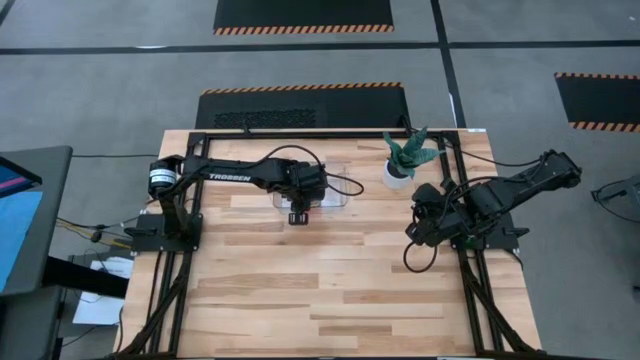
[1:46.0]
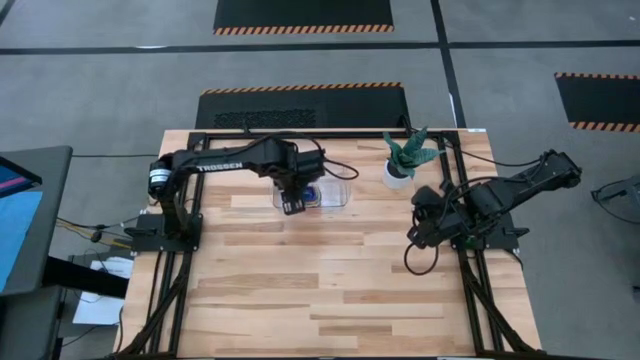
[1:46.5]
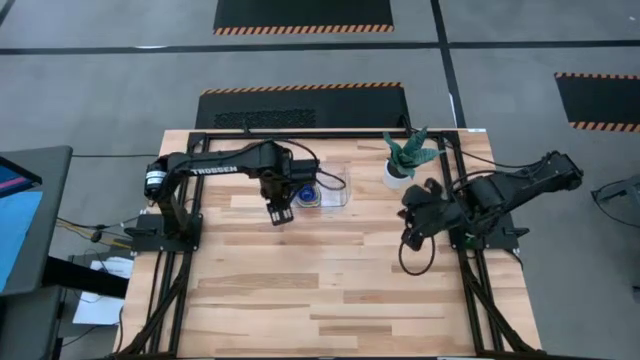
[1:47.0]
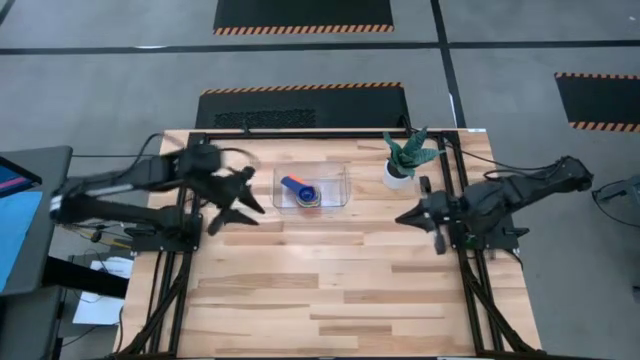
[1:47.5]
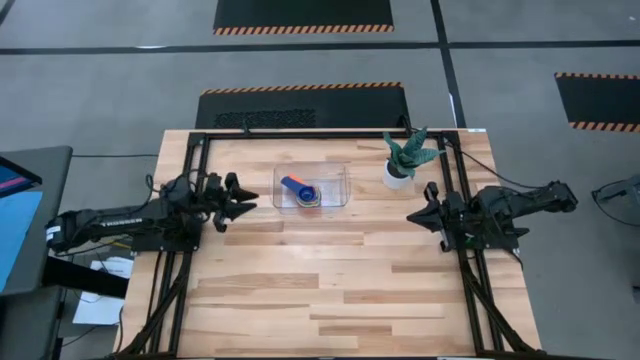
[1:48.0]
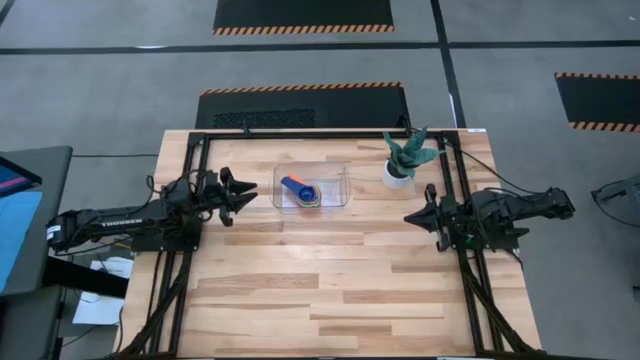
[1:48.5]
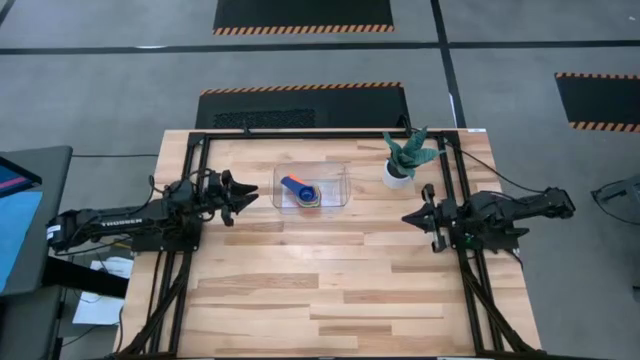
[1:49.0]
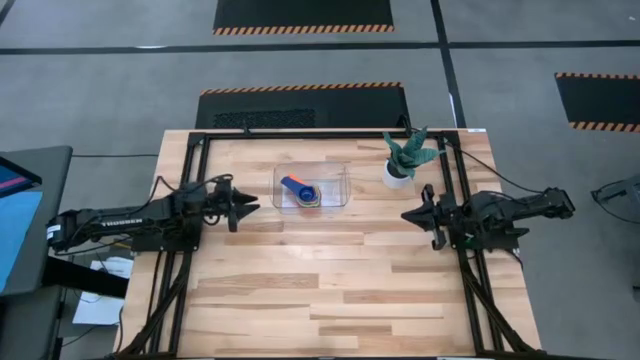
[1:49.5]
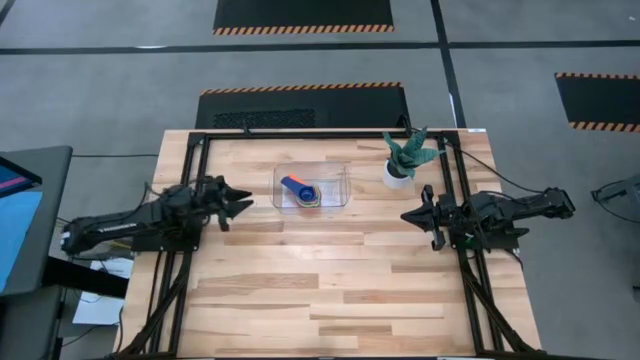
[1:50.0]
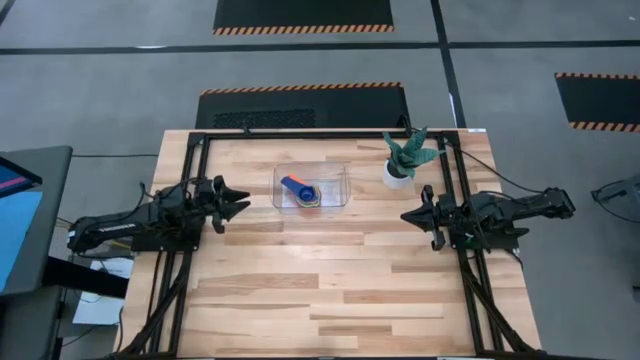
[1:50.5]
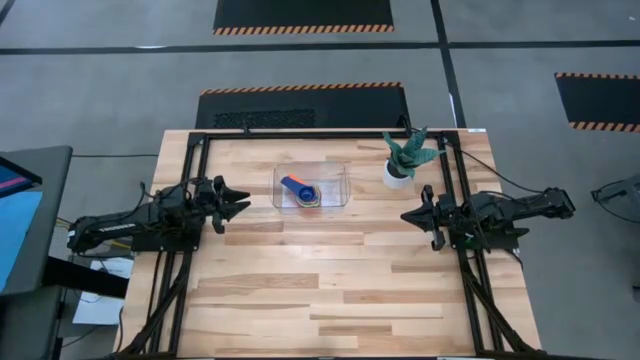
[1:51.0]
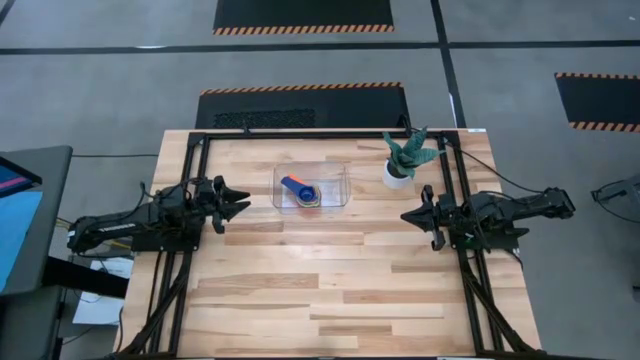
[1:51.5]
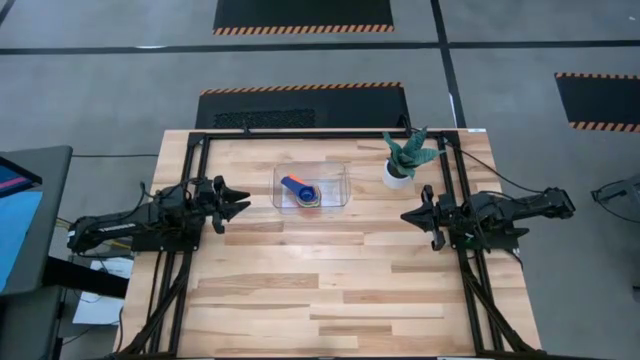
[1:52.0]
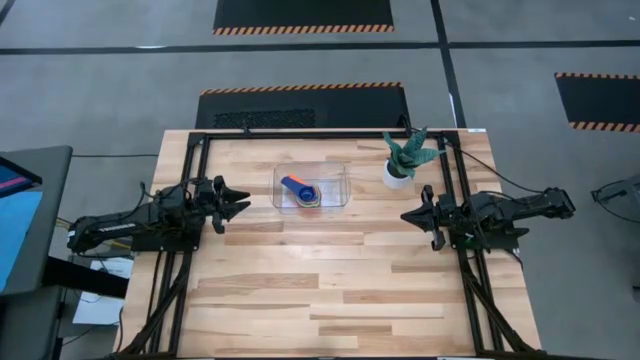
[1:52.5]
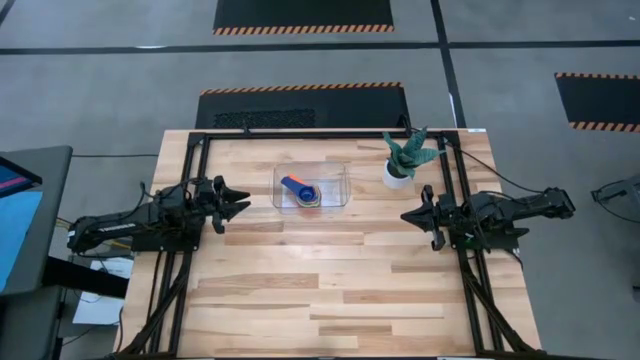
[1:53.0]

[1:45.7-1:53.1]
Task: Nest measuring cups in basket
Return to Home Position

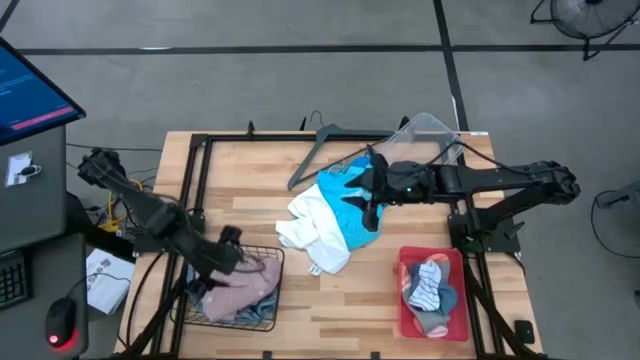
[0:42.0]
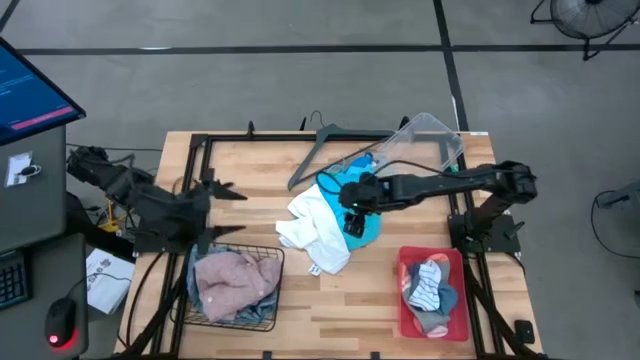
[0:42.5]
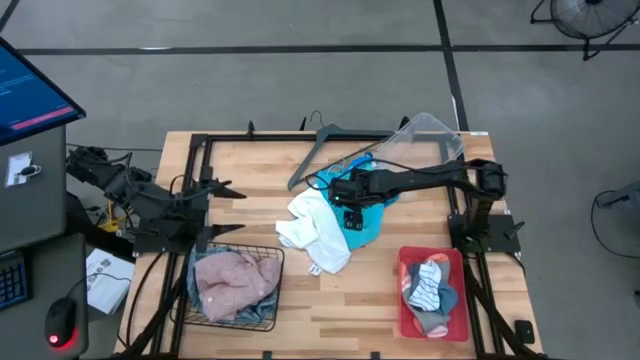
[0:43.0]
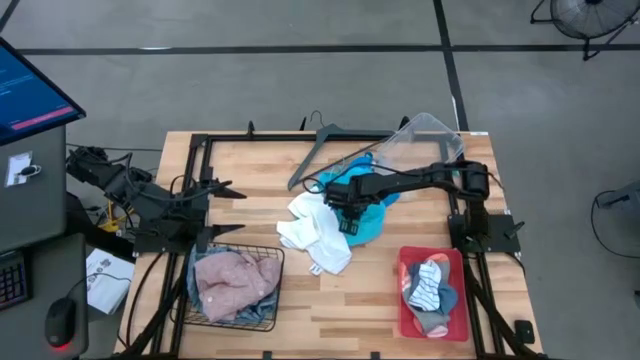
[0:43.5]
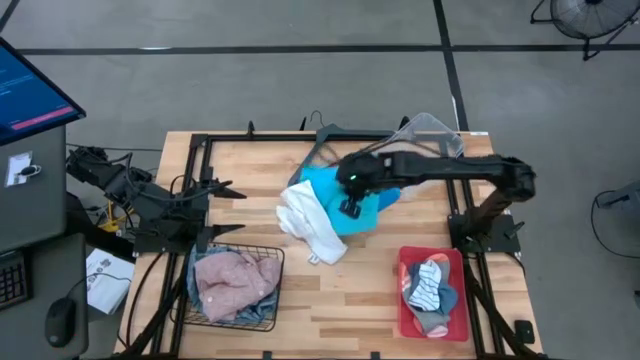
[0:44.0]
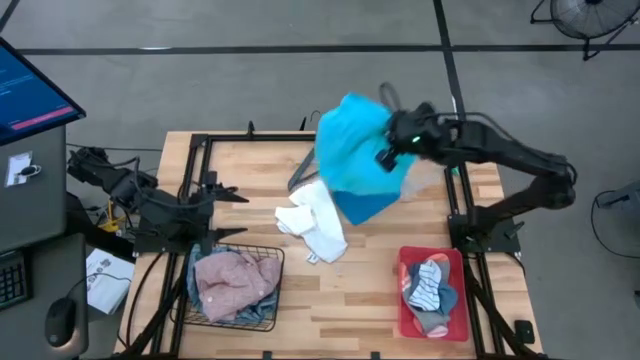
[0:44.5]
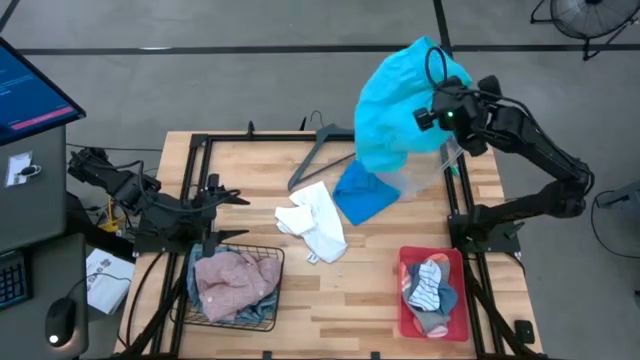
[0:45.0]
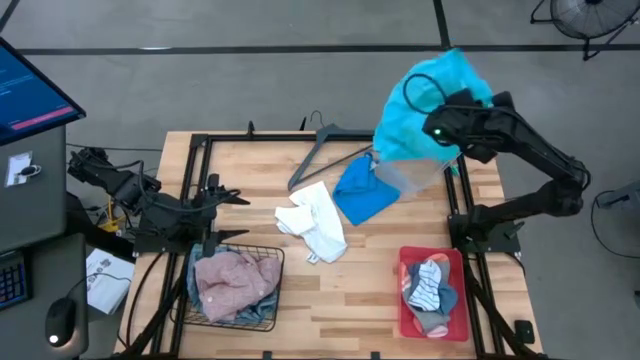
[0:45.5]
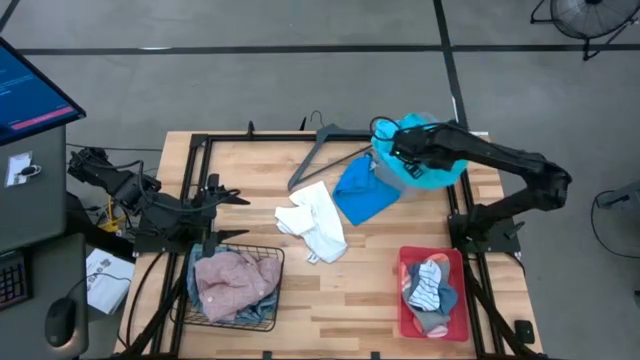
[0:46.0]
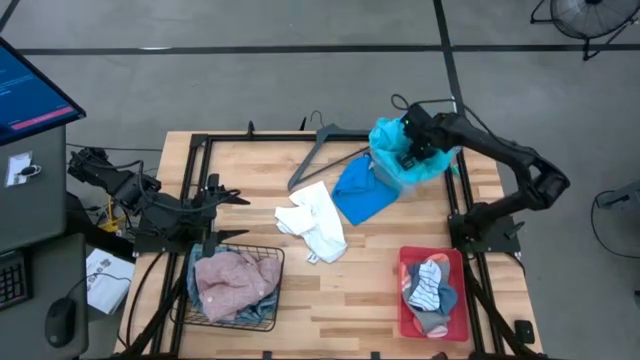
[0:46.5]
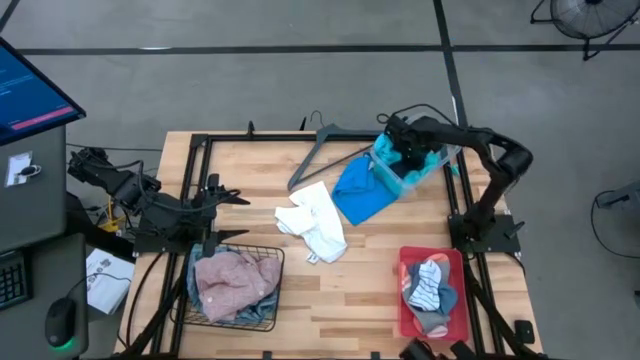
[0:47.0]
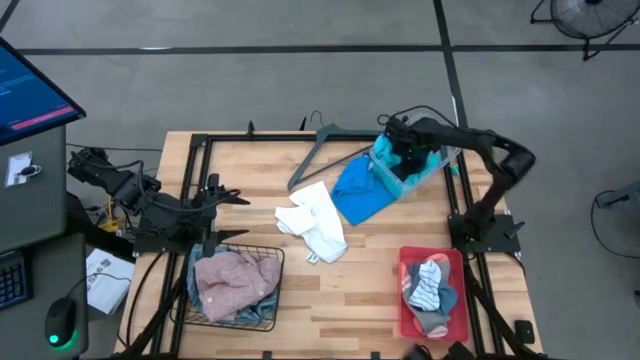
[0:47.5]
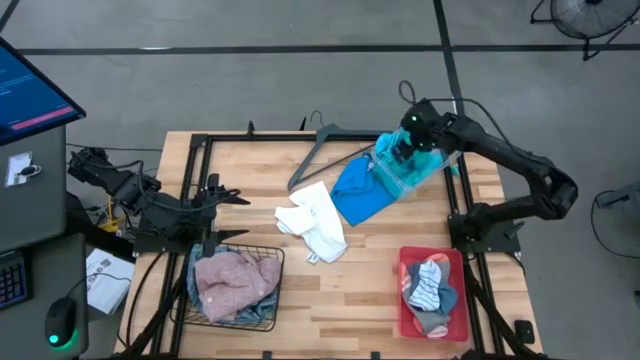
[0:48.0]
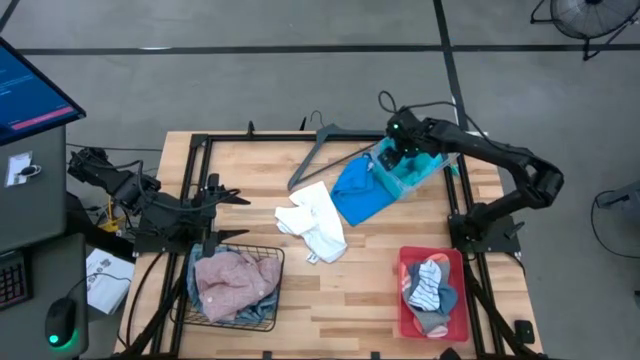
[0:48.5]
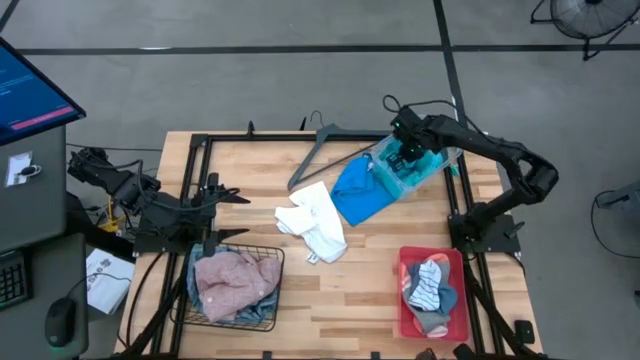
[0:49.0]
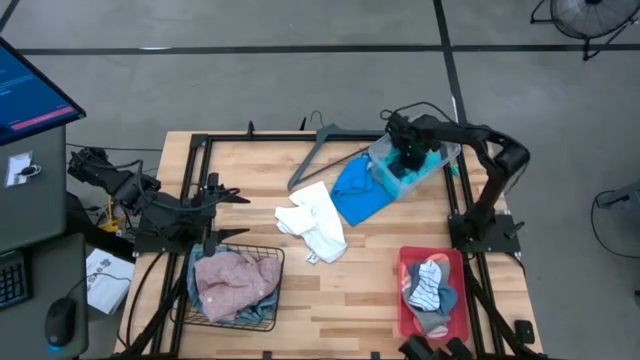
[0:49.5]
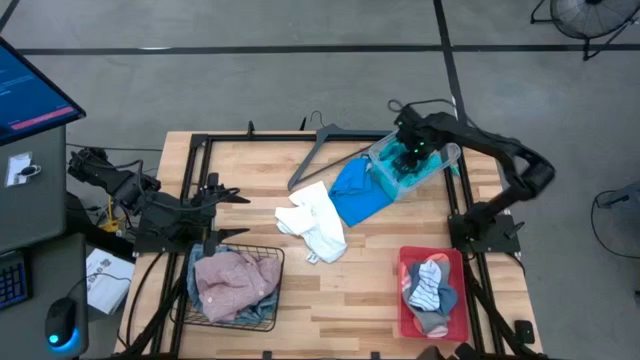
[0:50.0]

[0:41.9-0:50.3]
Task: Pick & Place Cloths
Put the blue shorts into the white bin

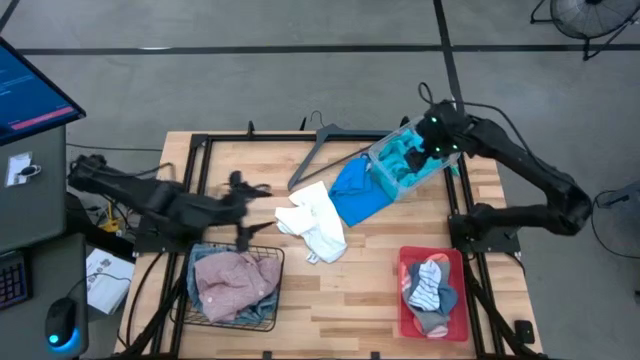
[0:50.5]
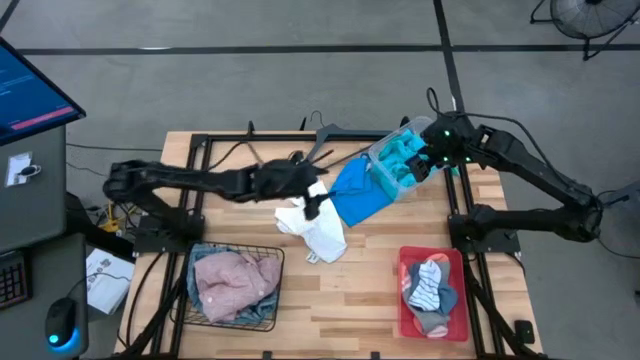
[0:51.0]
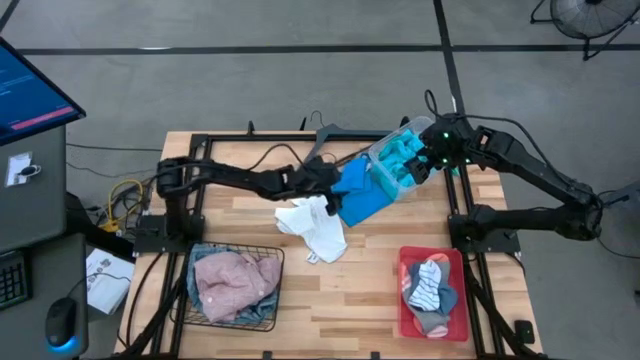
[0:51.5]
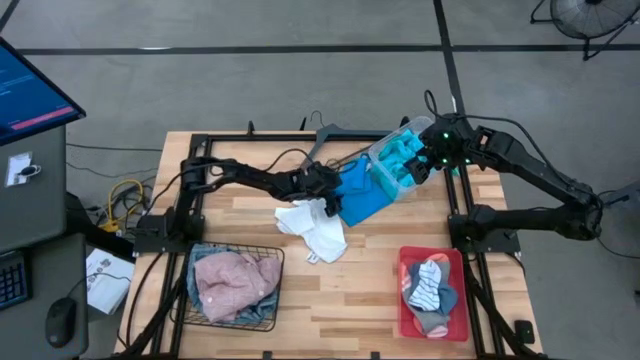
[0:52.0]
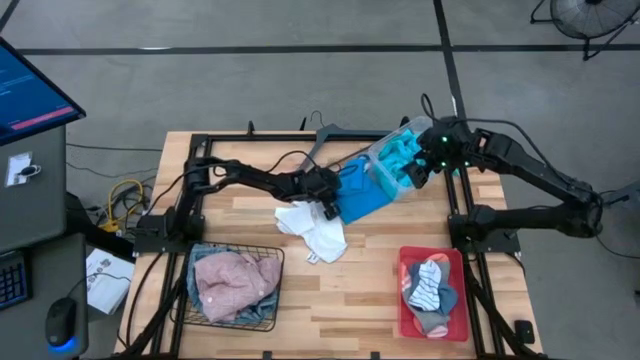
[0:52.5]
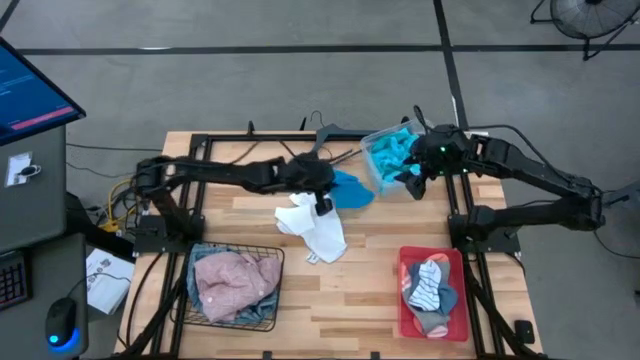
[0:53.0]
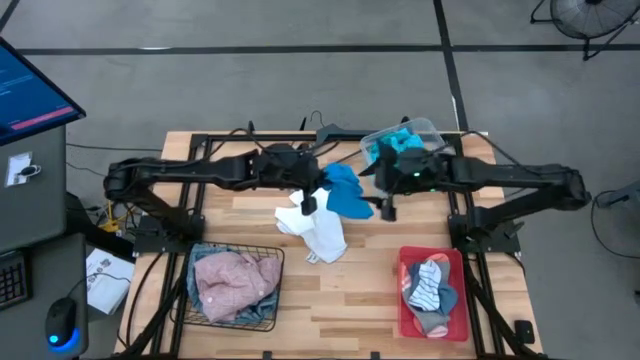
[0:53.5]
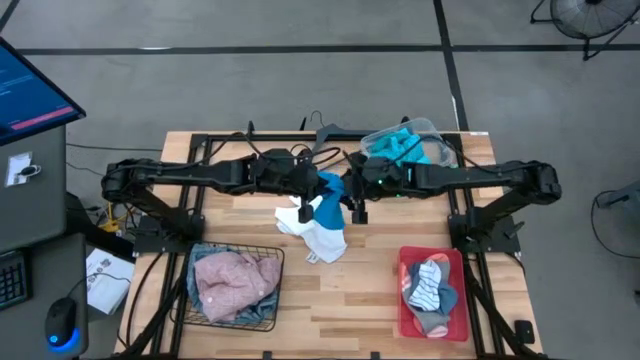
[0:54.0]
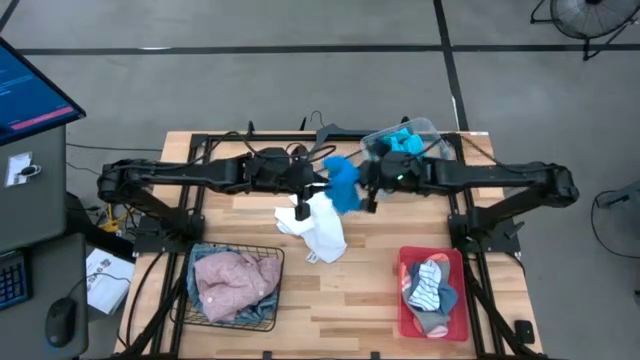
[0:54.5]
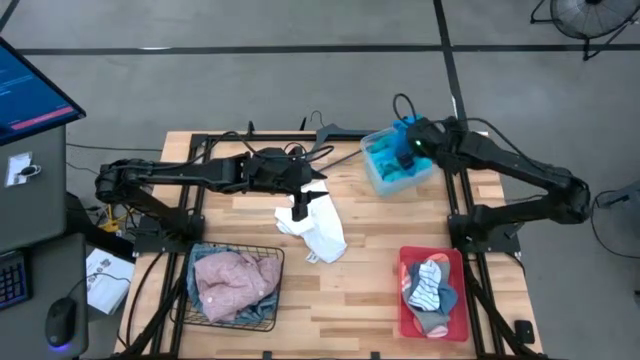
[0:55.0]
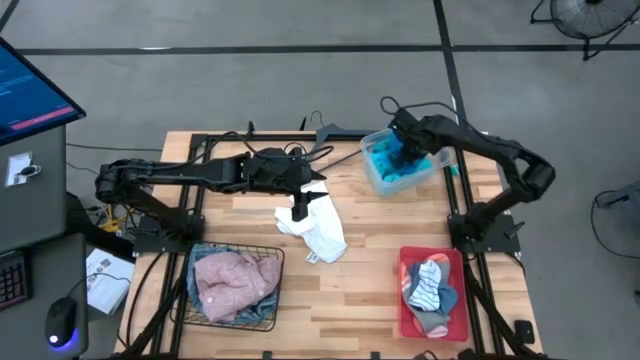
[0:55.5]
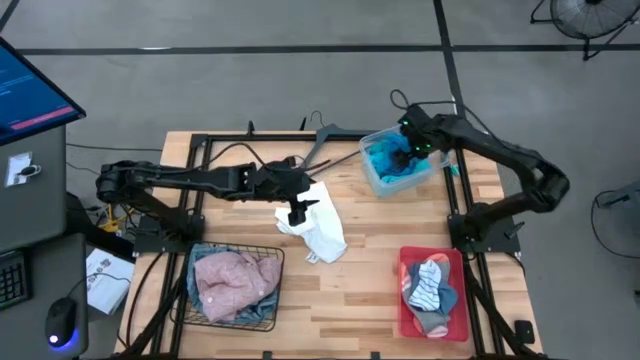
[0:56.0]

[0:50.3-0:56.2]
Put the dark blue shorts into the white bin
